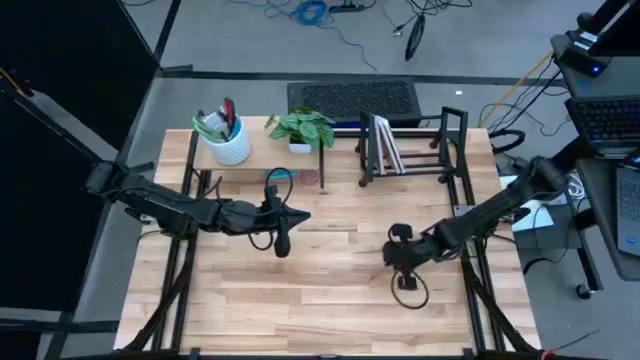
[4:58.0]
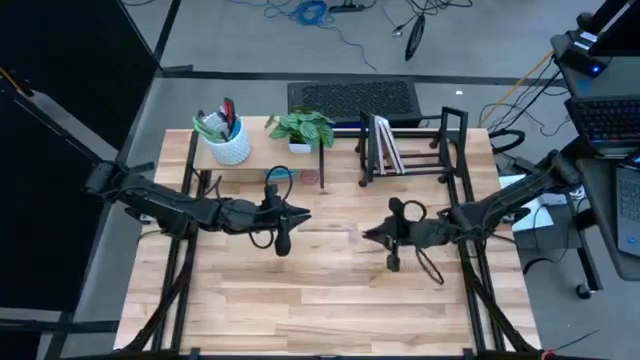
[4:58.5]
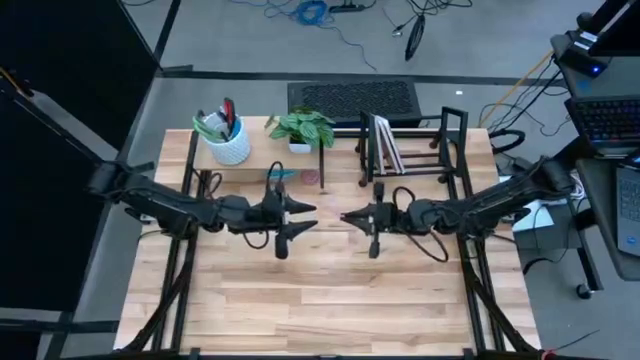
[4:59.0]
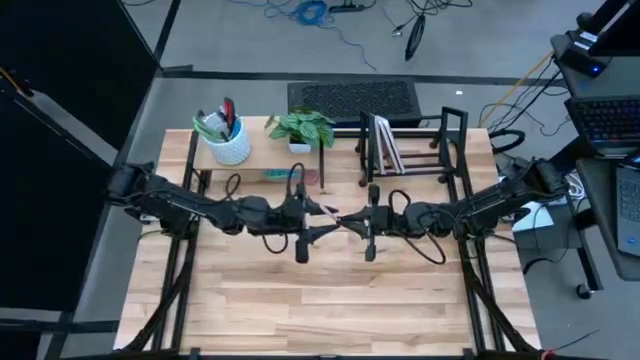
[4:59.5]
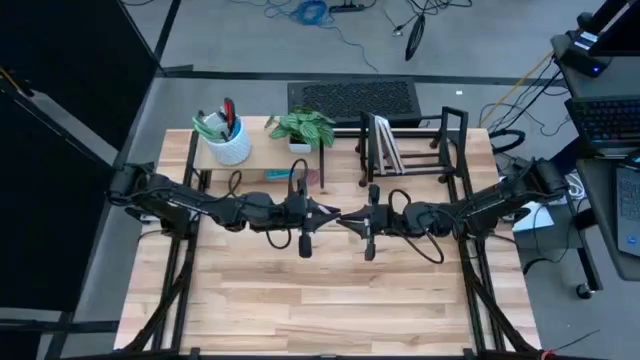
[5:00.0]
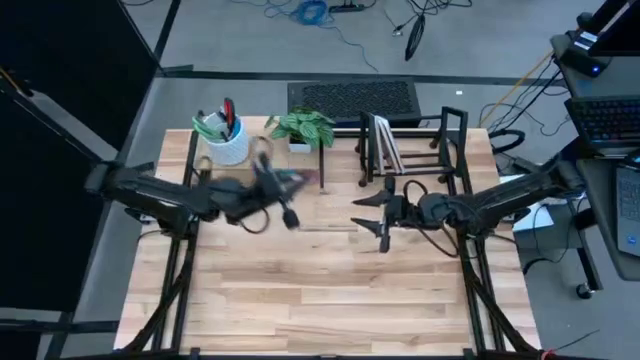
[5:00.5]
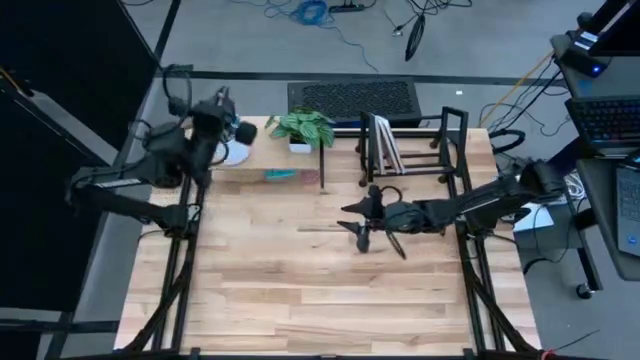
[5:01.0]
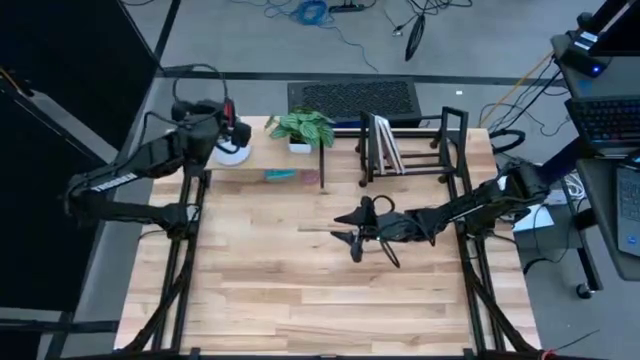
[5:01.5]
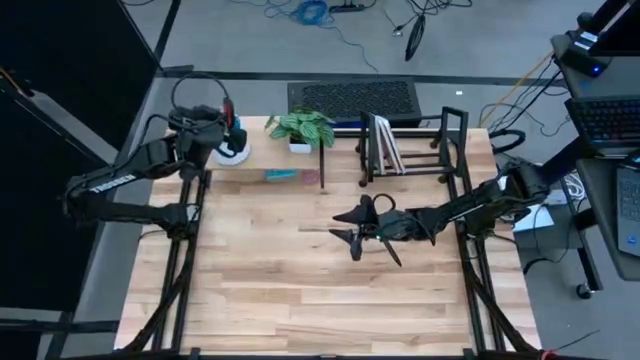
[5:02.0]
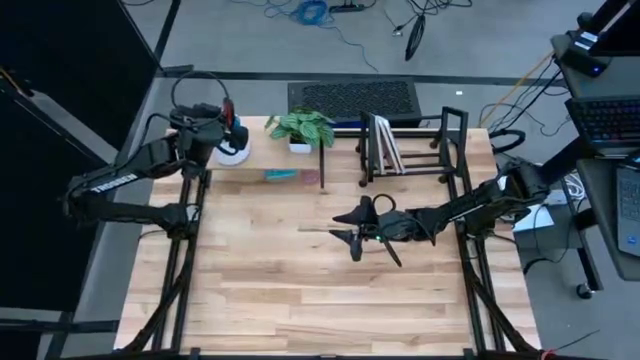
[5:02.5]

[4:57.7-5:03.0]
Task: Stock shelves
Put the pink pen into the white pen holder

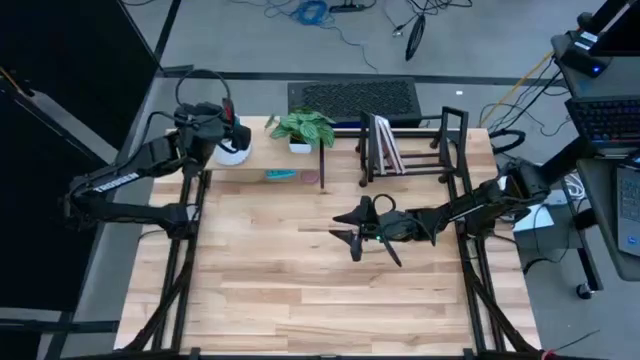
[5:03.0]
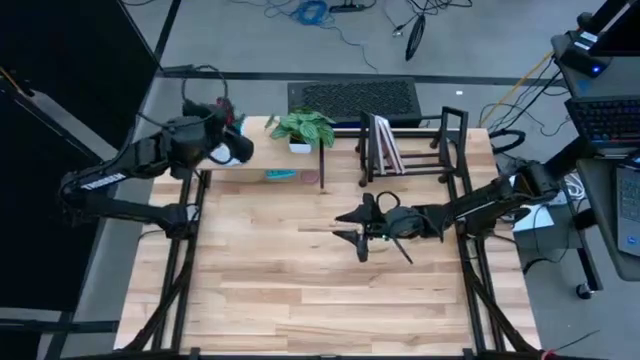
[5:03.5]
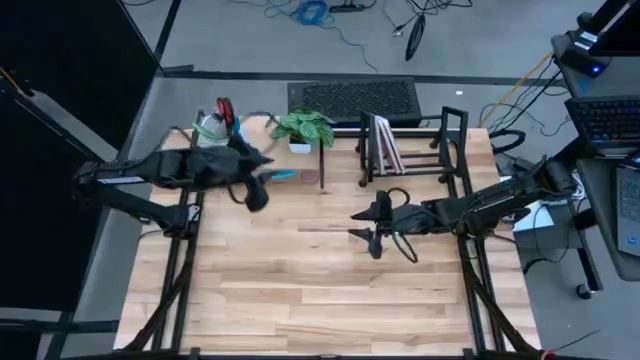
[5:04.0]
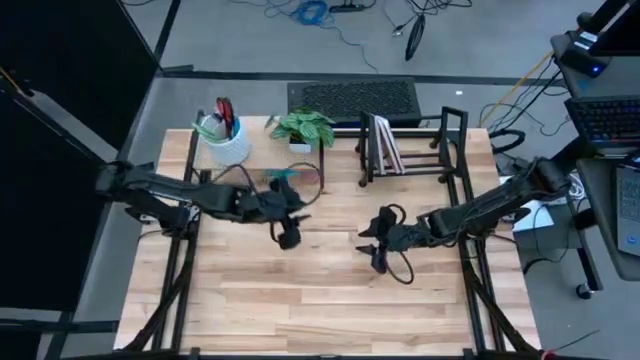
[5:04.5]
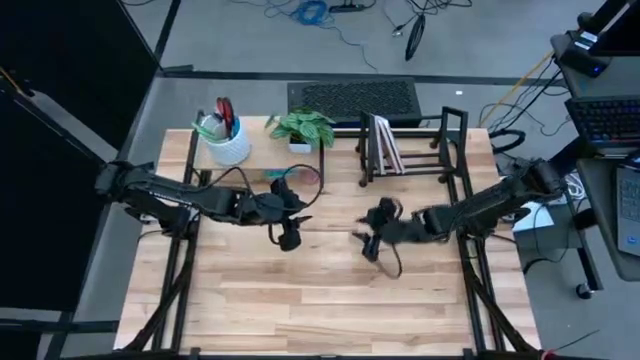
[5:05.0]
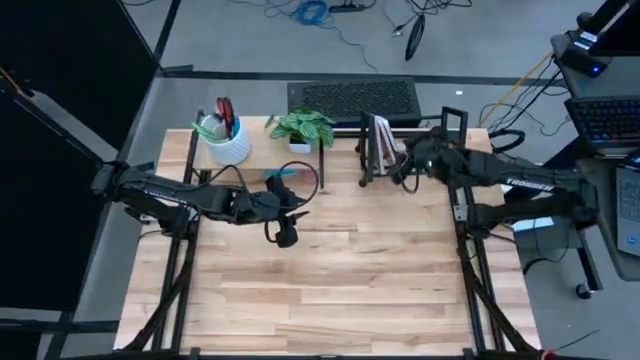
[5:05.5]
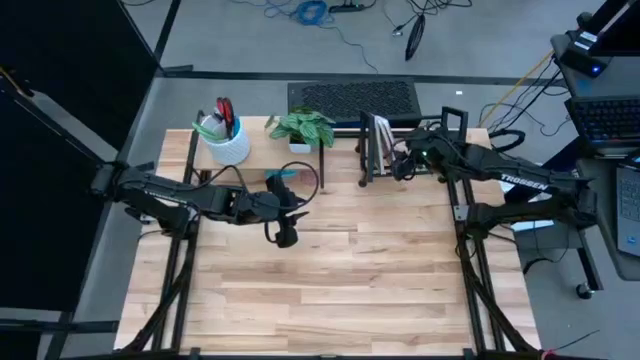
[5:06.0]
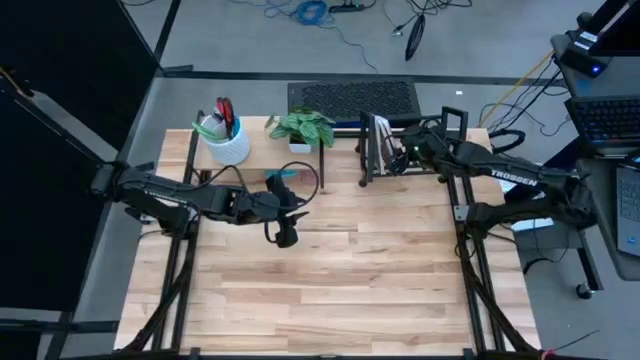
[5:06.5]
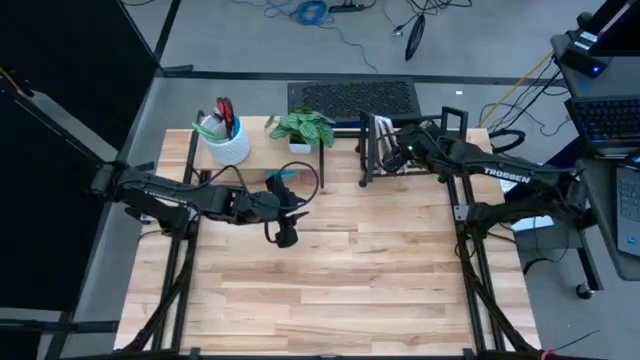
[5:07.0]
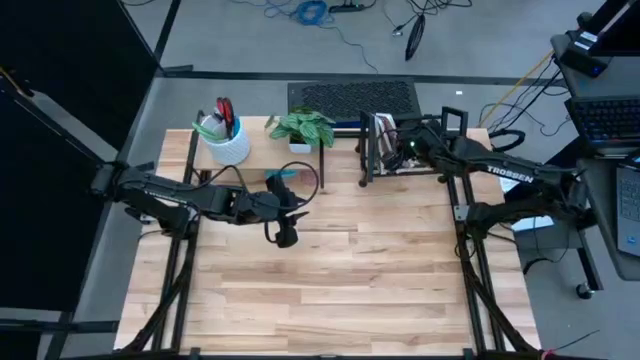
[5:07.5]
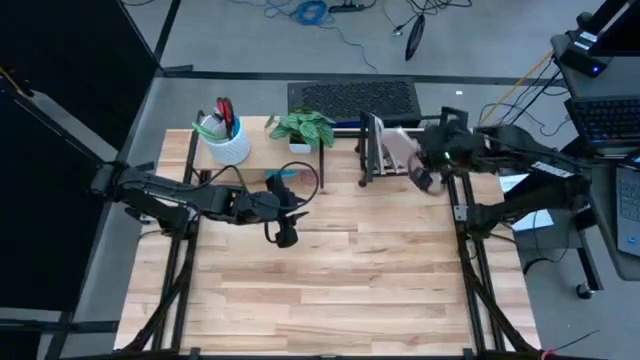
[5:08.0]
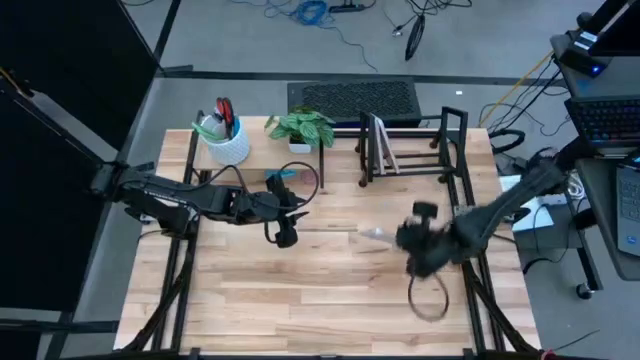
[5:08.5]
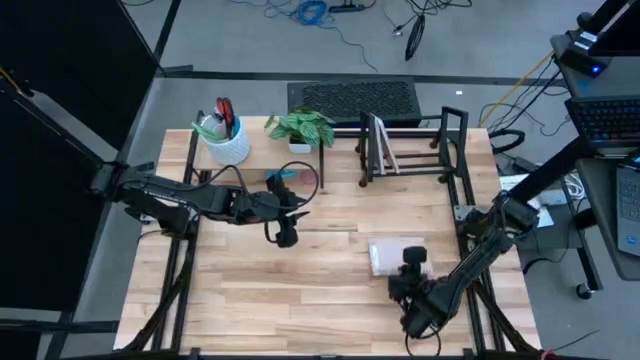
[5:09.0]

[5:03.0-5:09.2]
Remove the white notebook from the black bookshelf

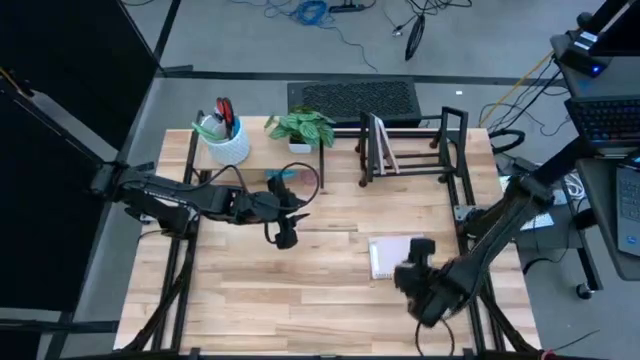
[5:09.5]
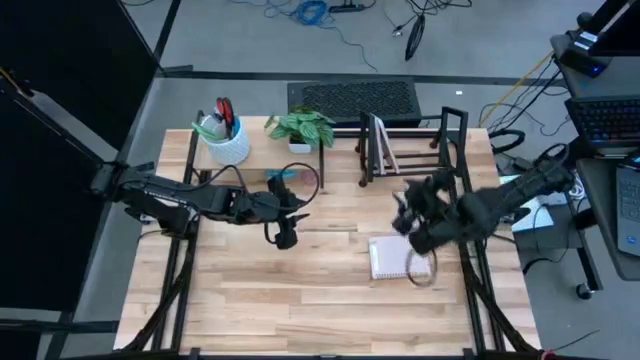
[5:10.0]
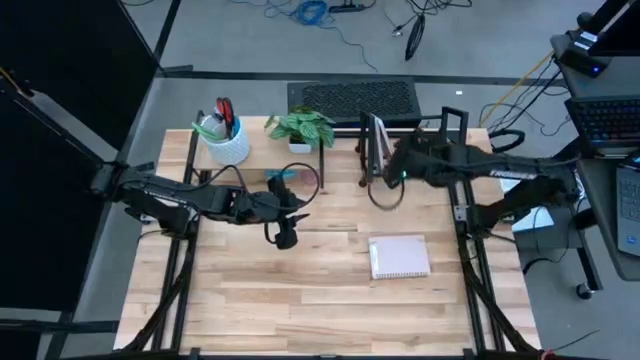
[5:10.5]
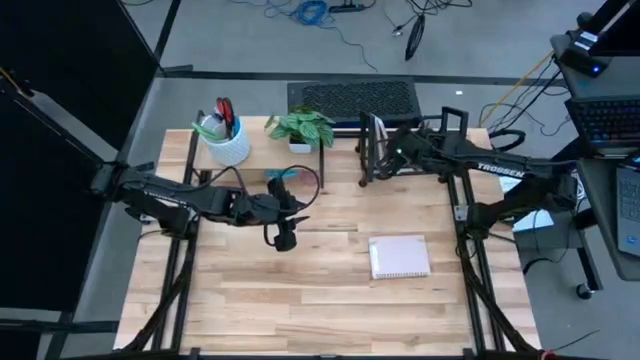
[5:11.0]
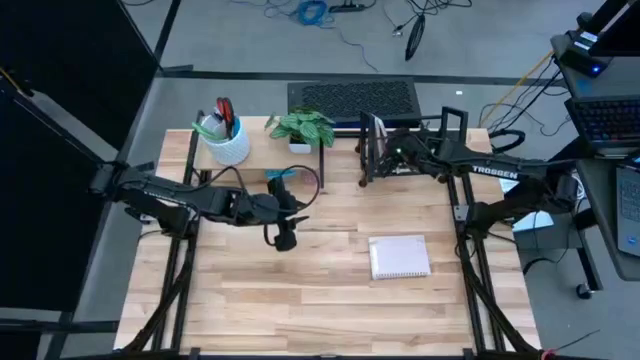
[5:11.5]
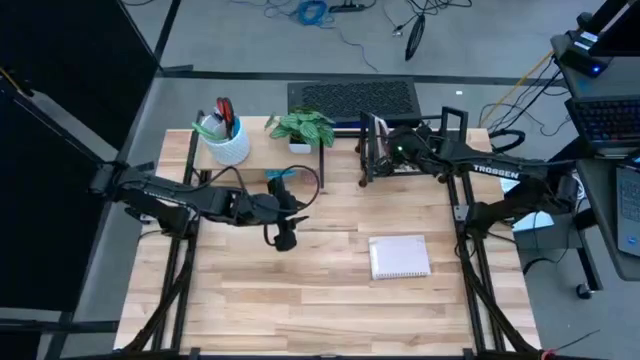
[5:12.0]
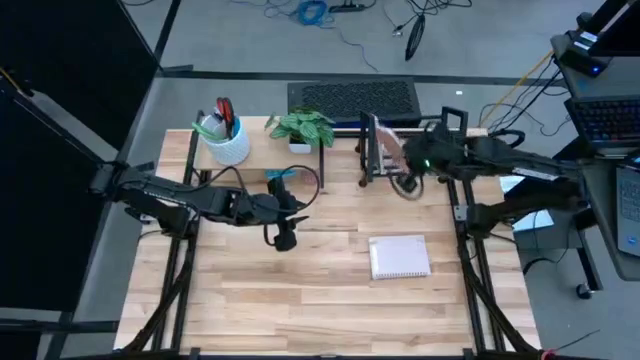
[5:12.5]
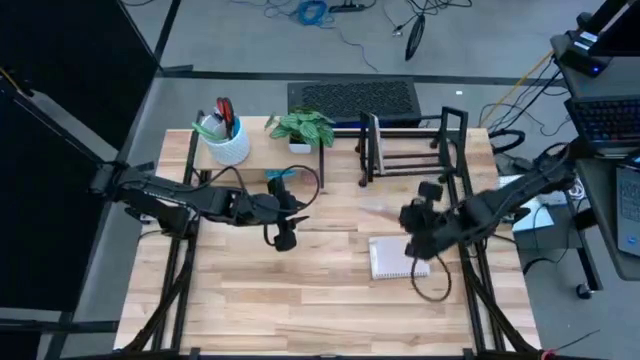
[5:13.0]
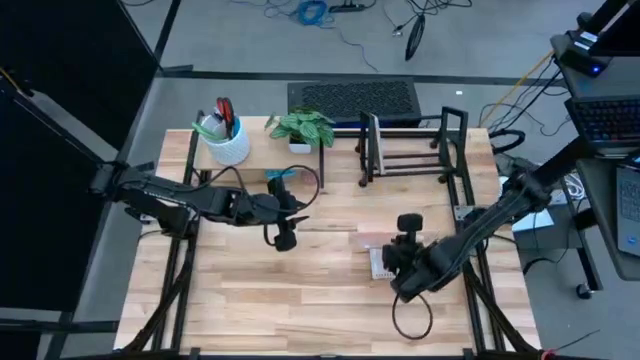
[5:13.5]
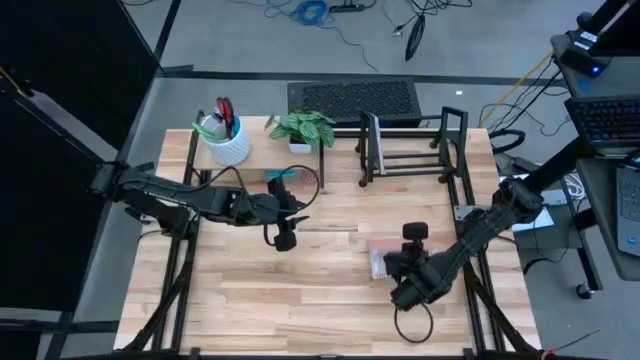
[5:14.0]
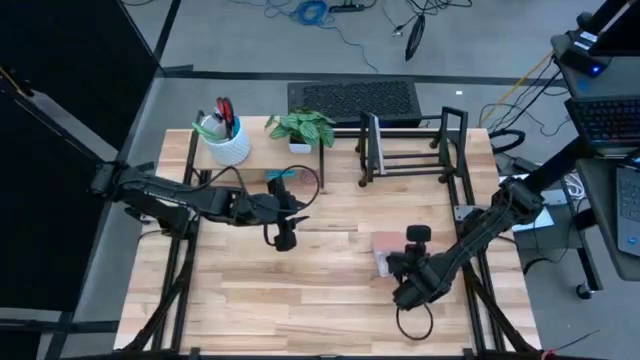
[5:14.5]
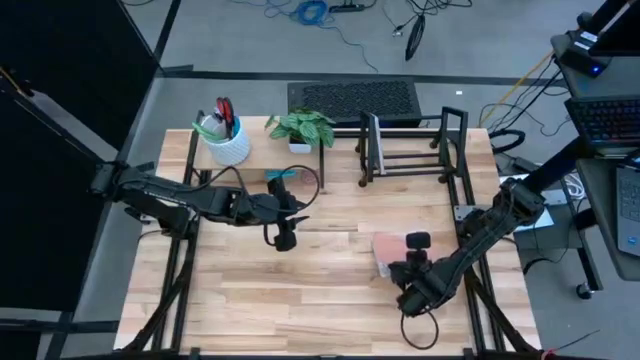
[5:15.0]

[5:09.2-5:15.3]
Remove the pink notebook from the black bookshelf

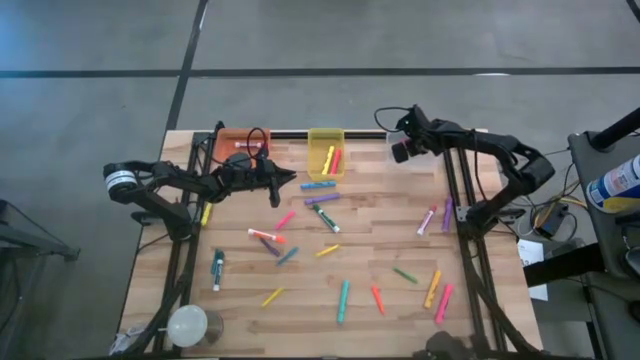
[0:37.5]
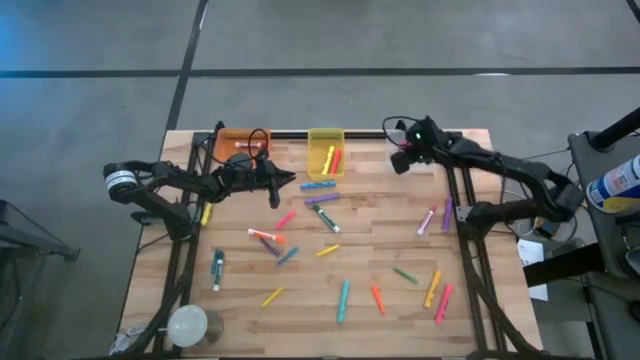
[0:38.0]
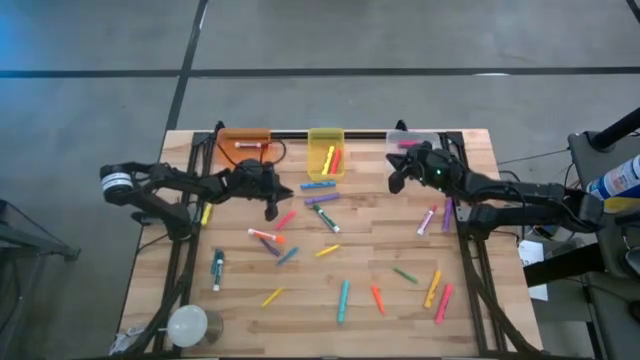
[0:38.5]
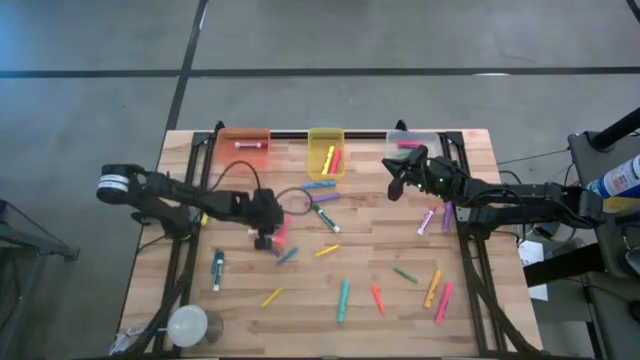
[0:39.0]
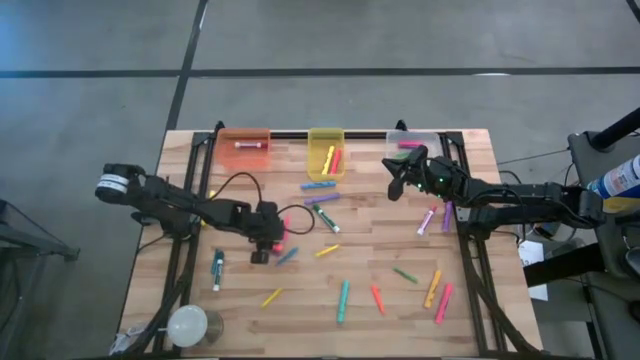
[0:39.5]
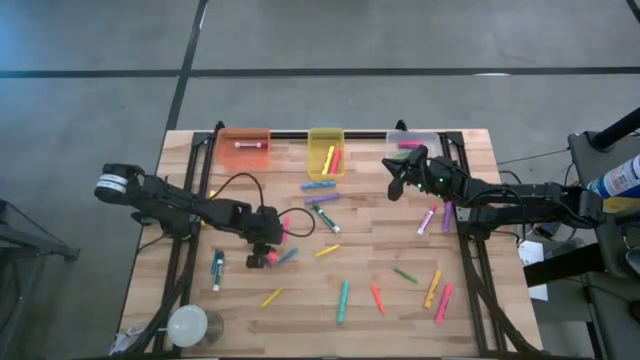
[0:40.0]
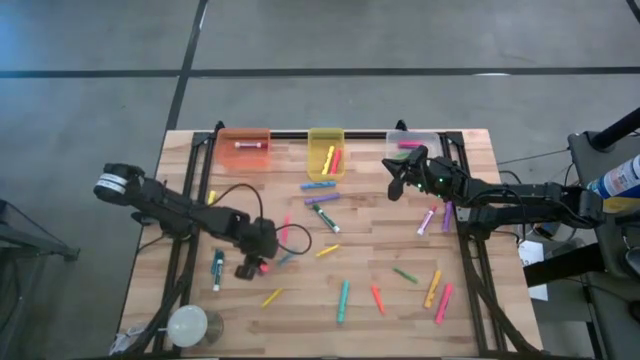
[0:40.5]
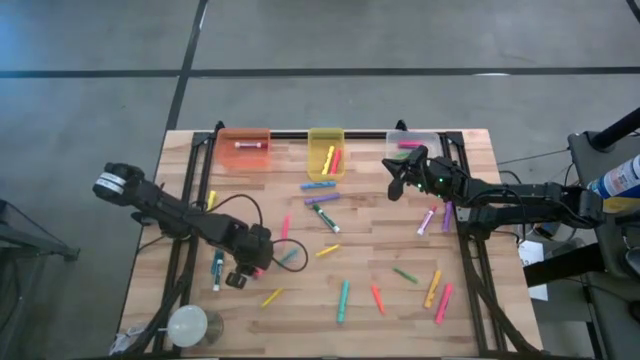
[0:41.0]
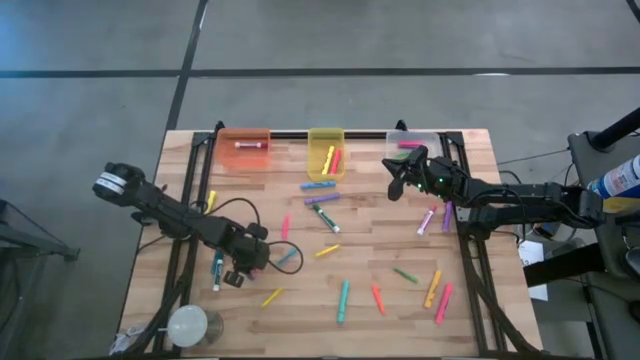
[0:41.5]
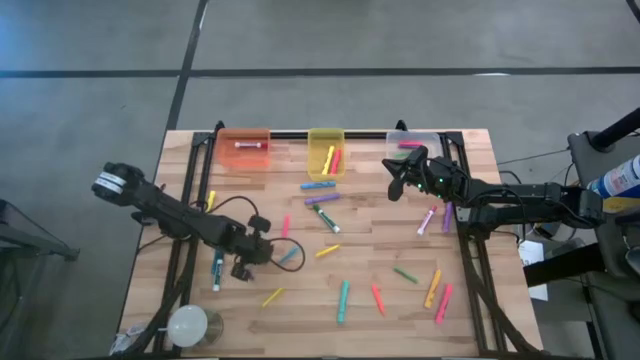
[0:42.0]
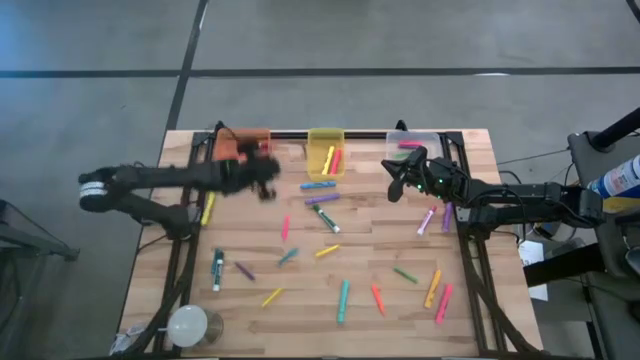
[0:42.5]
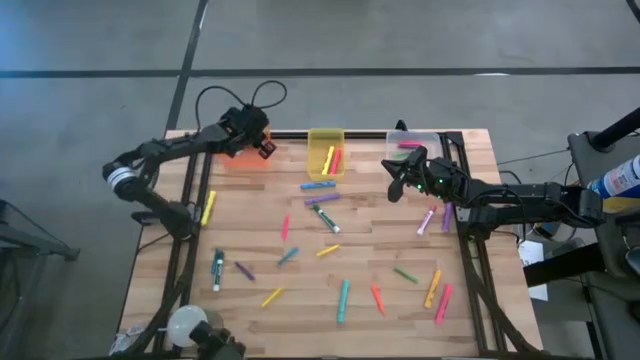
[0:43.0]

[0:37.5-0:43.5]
Task: Pick & Place Markers
Put the orange marker pen into the orange bin
